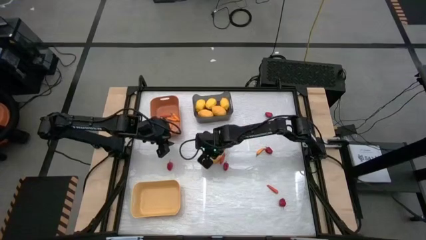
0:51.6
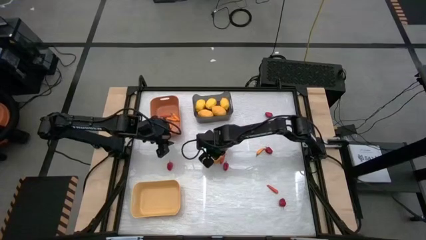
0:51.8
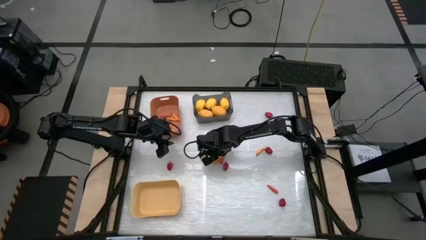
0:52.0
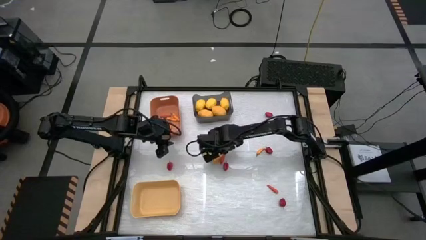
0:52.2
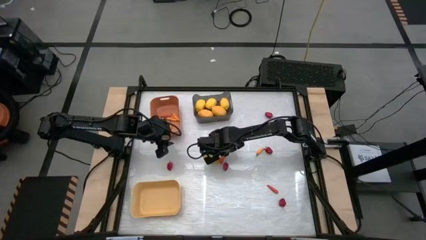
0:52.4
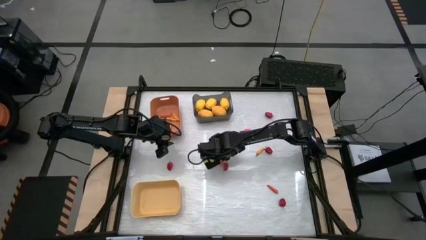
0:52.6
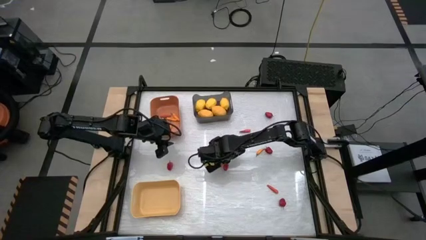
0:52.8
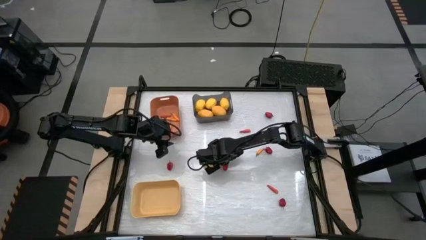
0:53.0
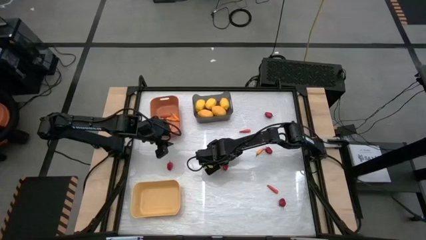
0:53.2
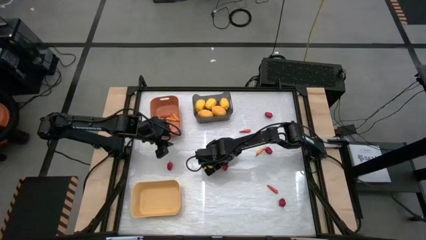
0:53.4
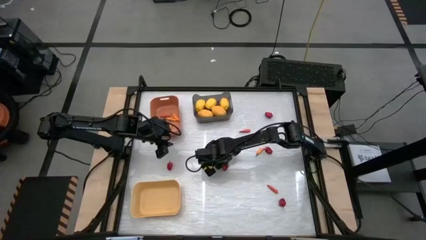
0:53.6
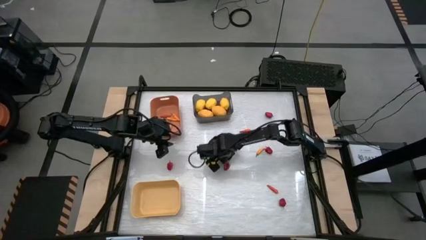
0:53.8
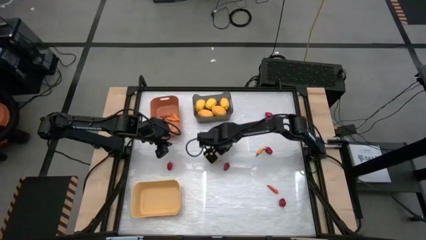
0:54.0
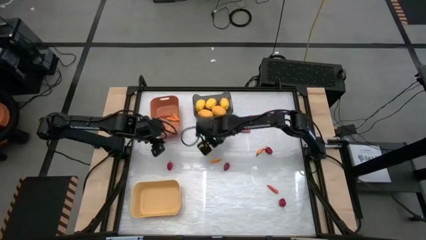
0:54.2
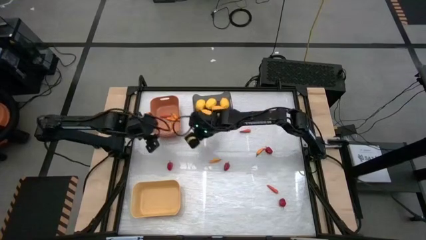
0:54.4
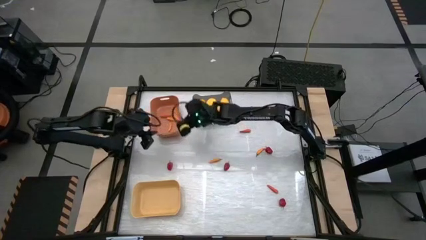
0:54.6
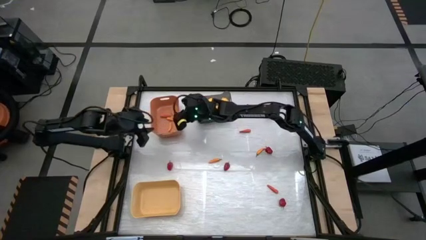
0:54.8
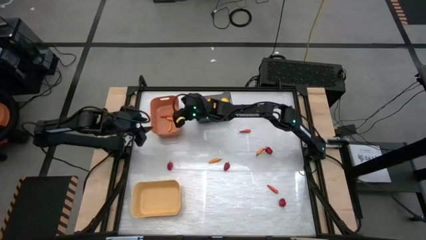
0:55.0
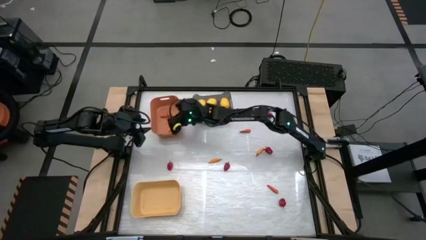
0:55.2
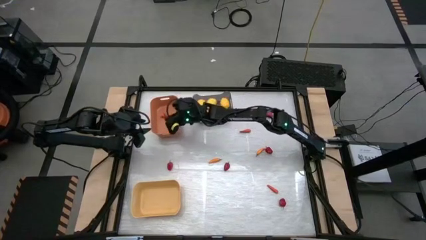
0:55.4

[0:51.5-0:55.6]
Task: Sort produce into baskets
Put the orange chili pepper into the orange bin

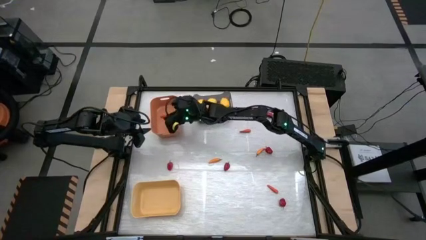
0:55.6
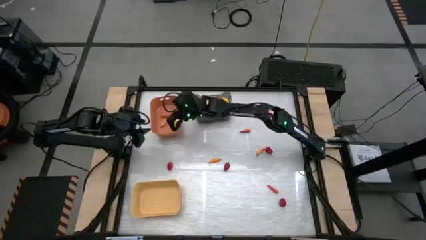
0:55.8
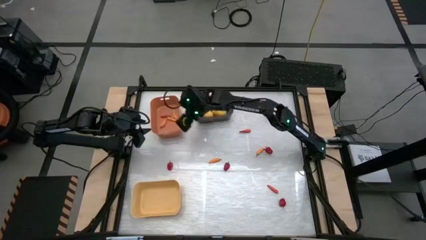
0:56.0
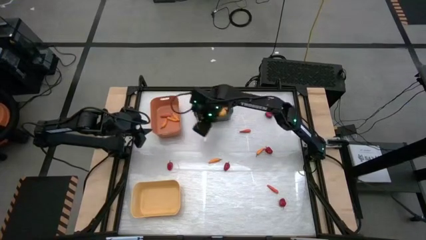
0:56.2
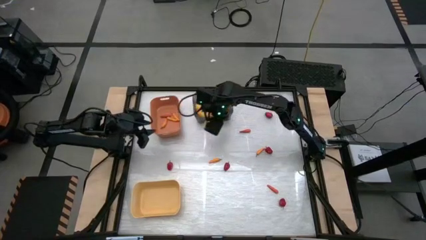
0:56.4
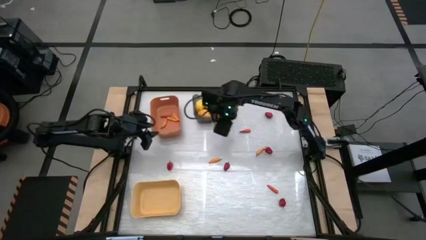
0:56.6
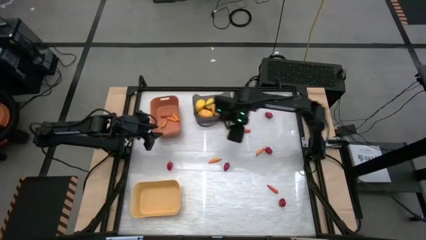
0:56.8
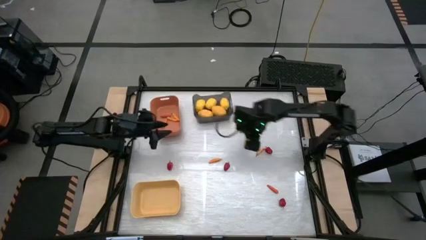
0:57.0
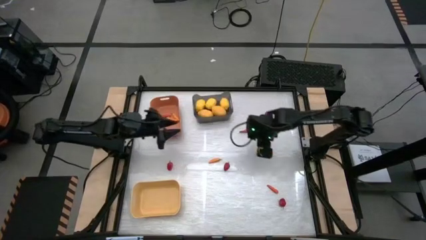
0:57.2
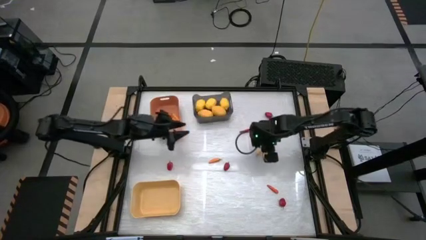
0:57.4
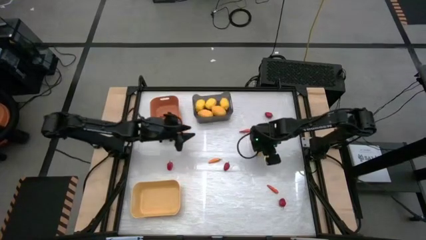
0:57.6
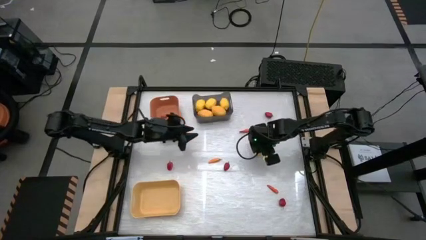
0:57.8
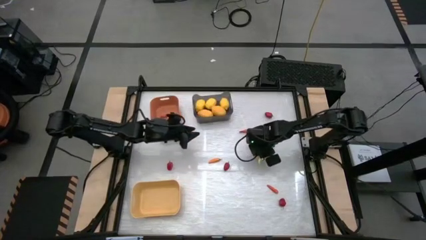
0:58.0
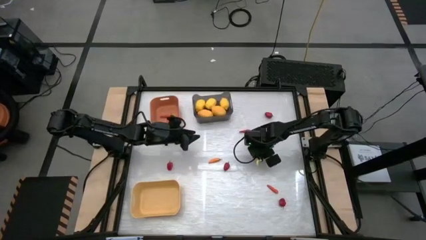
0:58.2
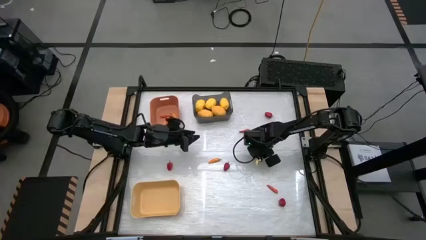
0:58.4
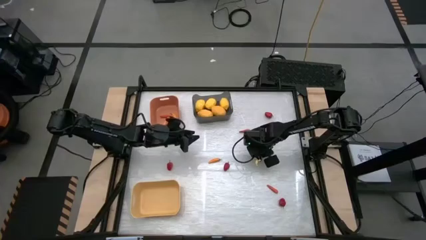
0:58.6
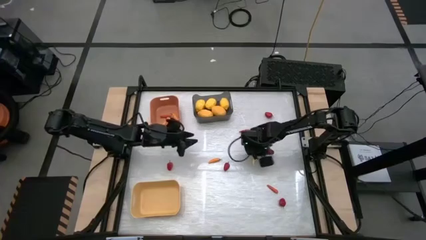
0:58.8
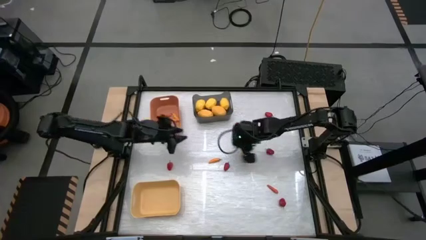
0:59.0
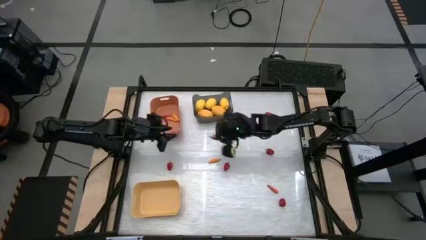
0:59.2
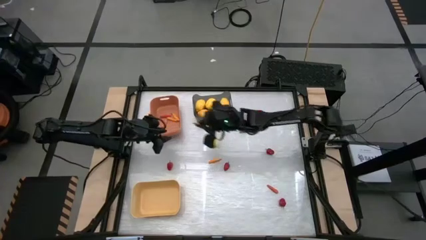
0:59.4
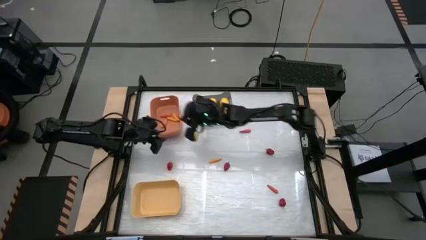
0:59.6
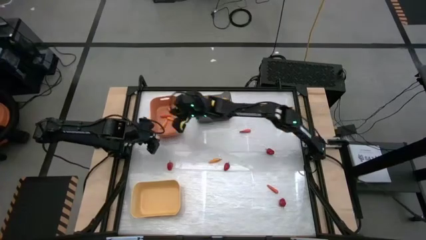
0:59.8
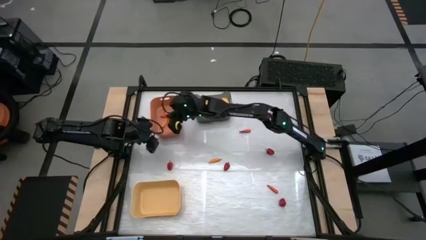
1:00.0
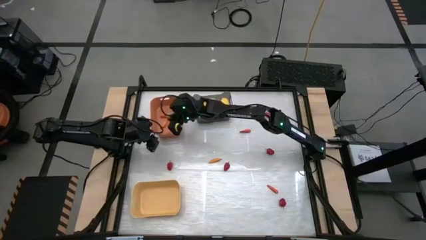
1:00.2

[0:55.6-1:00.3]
Put the yellow chili pepper into the orange bin

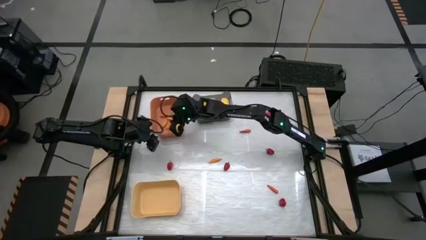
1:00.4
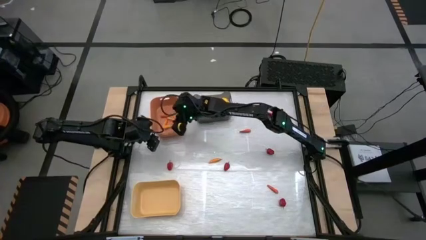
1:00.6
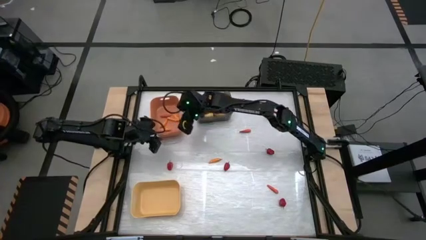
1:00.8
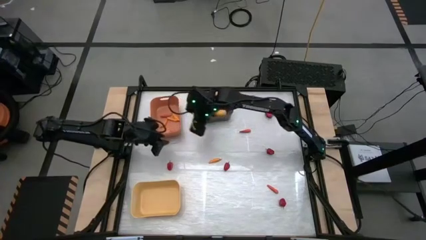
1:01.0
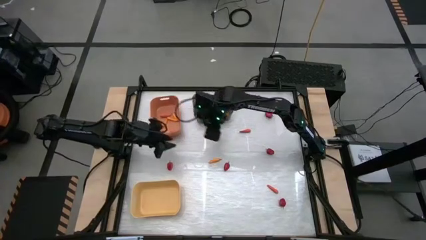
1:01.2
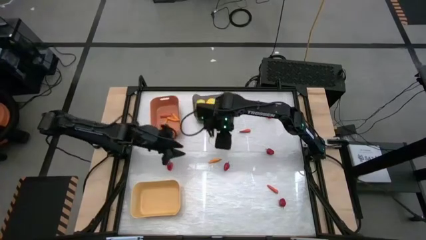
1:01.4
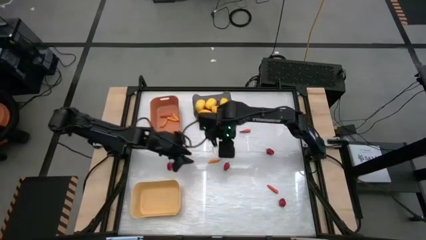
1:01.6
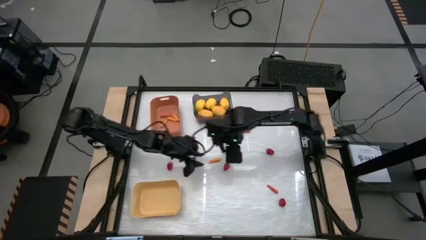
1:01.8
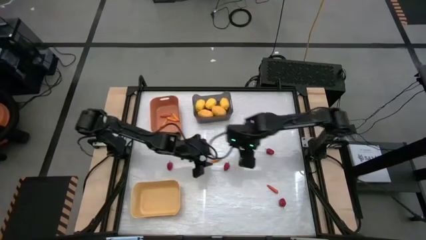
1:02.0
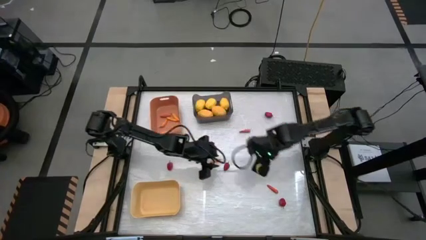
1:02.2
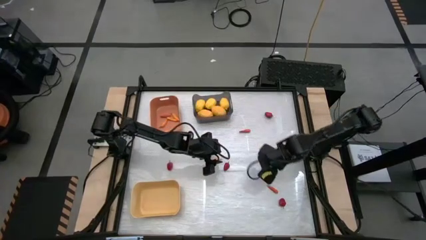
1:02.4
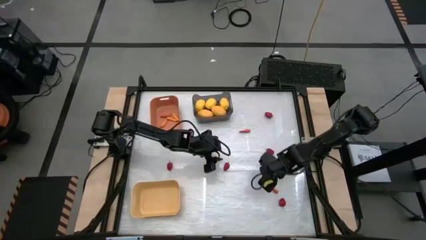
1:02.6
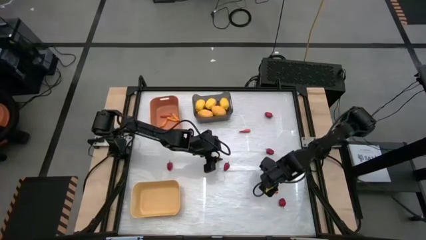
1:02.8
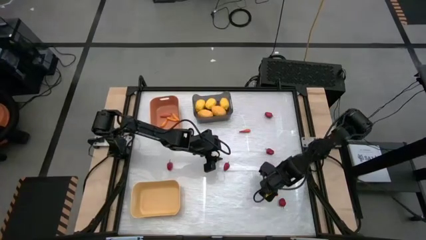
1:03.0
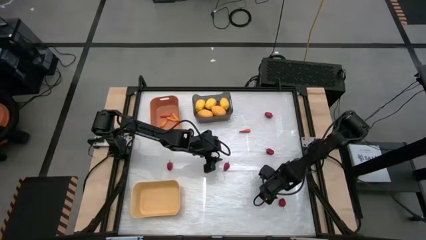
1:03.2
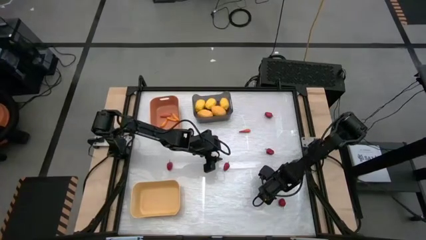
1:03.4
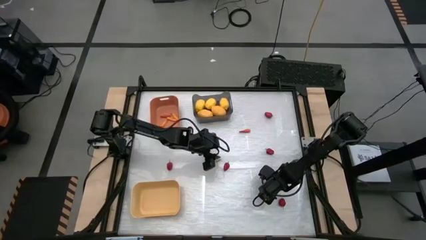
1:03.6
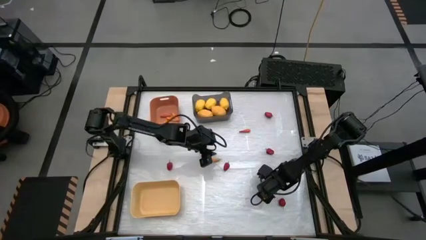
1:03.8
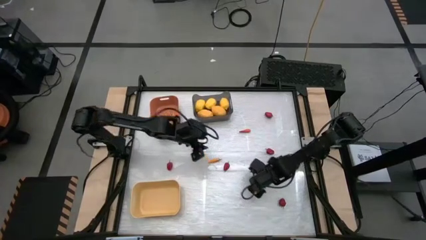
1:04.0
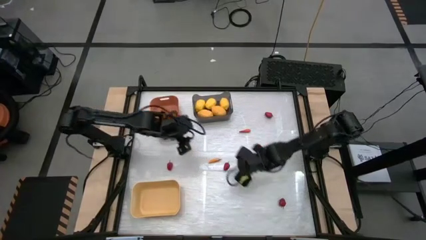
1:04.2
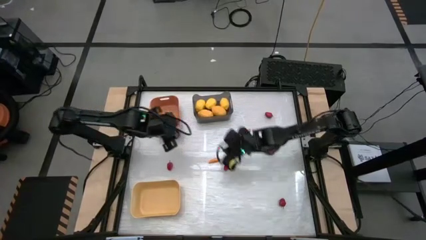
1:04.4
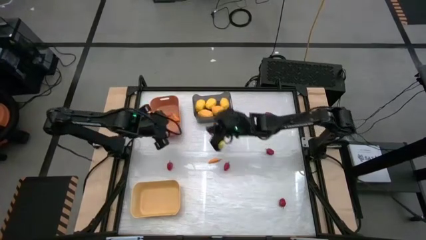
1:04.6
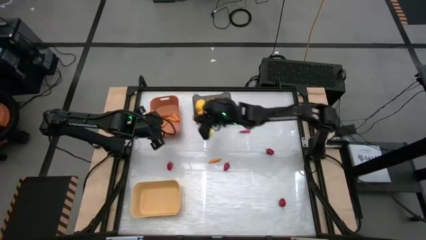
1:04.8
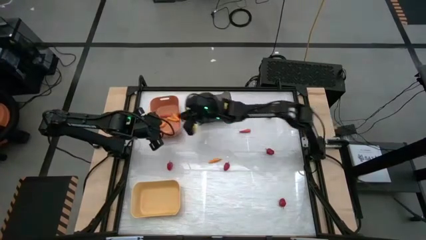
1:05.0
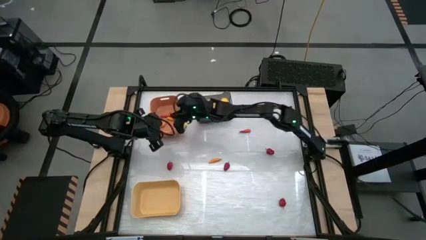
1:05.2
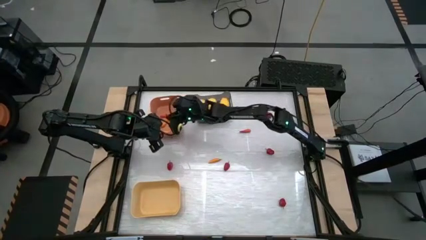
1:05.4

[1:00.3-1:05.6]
Put the orange chili pepper into the orange bin

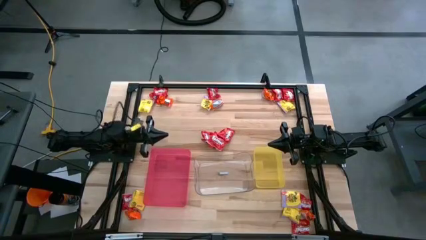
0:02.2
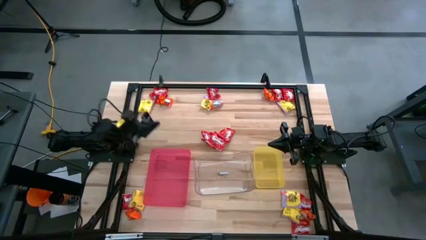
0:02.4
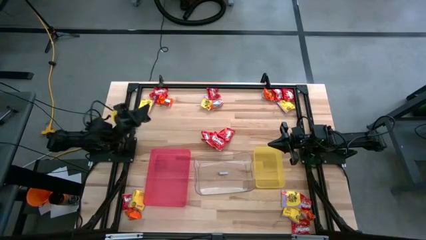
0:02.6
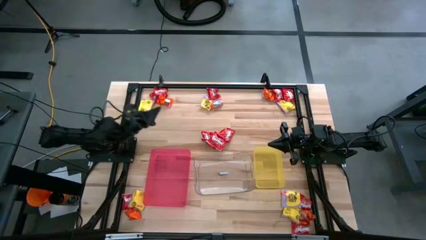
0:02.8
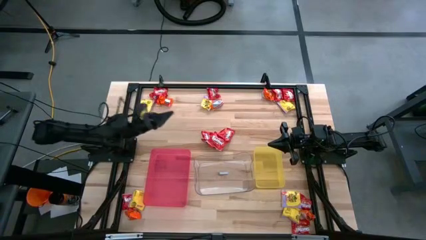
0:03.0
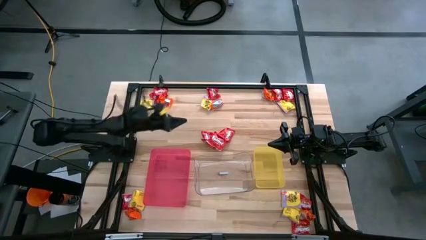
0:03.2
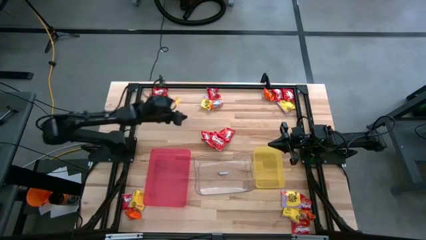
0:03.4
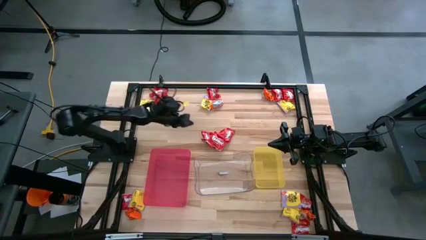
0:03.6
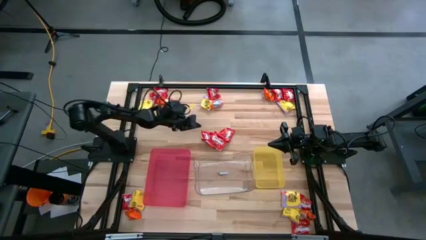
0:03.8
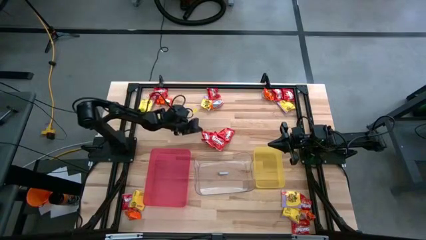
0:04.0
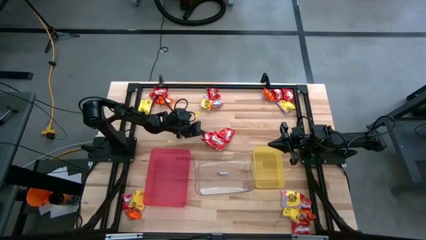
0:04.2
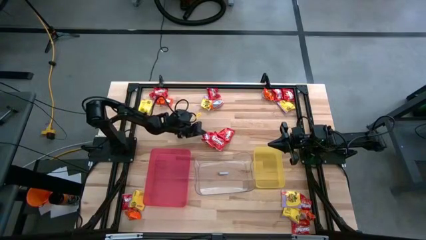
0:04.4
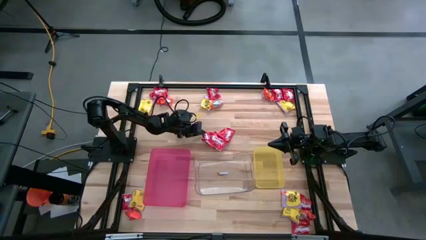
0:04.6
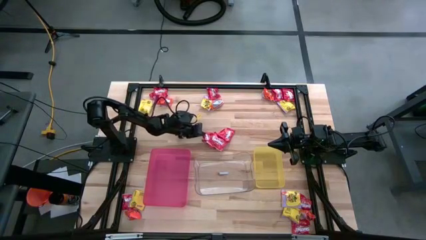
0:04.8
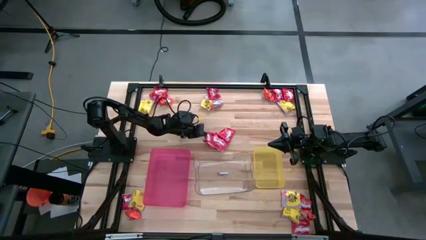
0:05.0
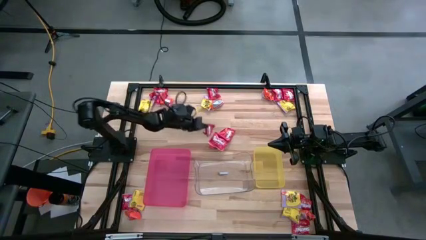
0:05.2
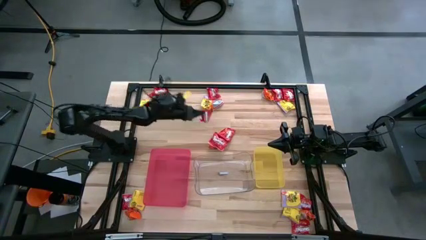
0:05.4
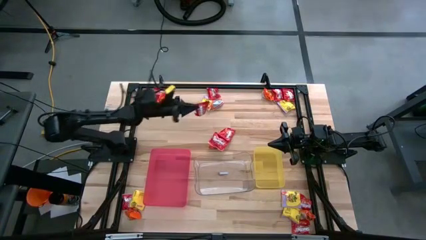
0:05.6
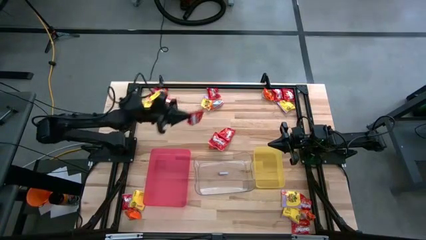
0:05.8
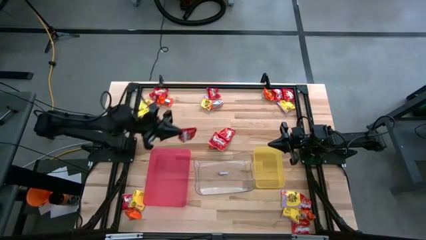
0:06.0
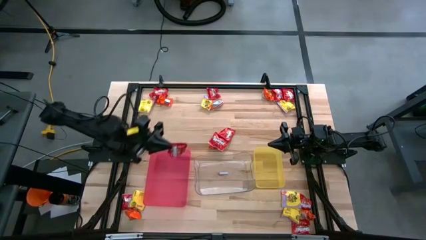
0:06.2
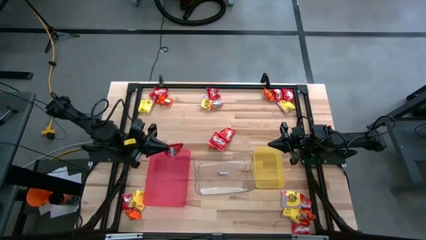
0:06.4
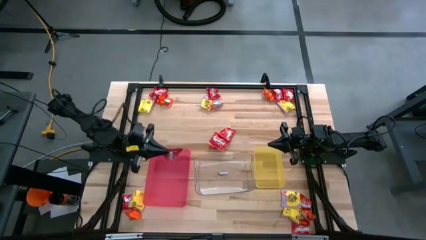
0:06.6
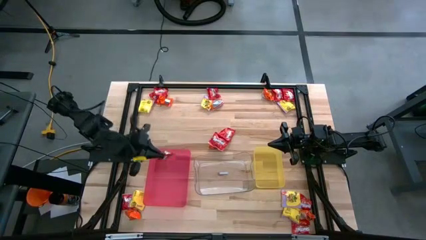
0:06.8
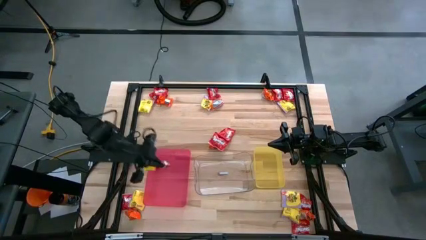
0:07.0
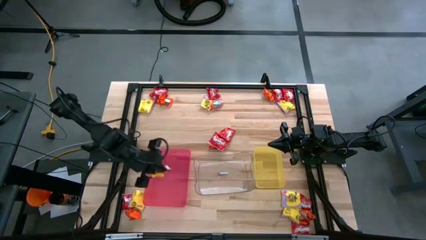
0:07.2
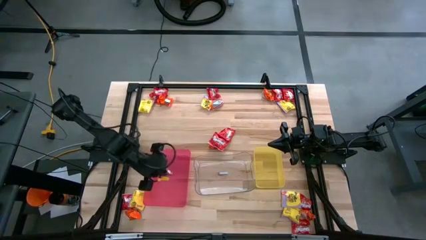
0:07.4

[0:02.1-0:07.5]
Task: Sort candy
Put the red candy into the red bin
